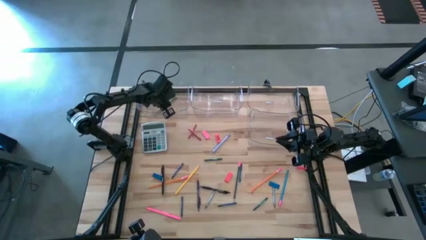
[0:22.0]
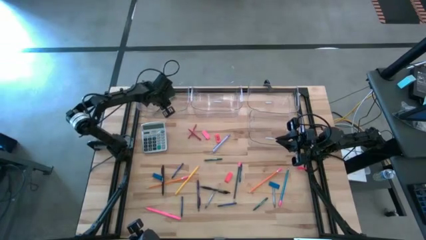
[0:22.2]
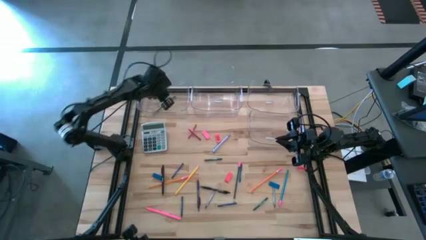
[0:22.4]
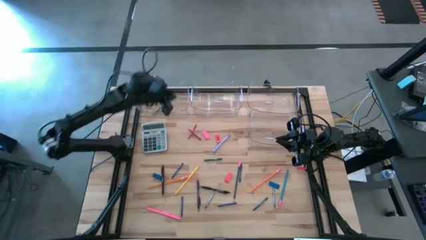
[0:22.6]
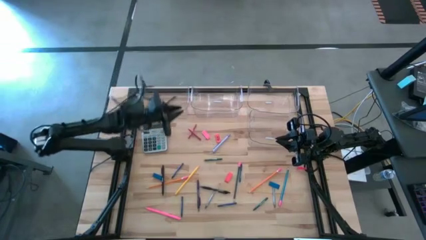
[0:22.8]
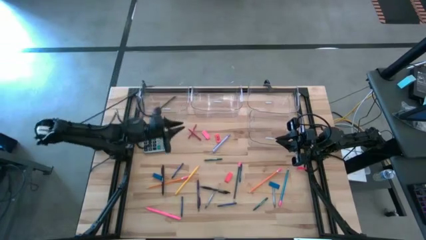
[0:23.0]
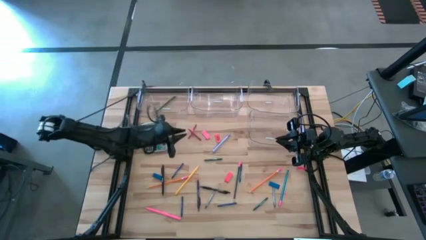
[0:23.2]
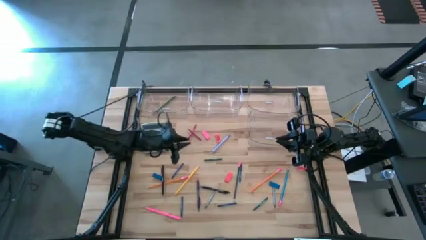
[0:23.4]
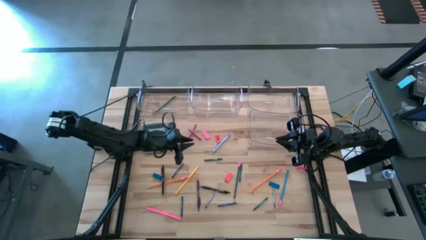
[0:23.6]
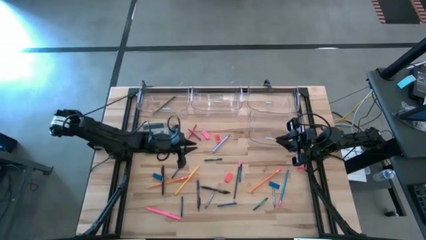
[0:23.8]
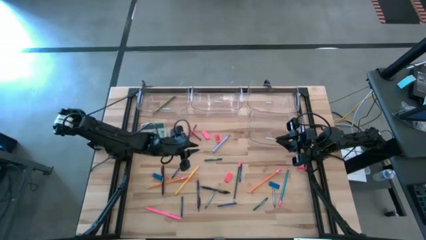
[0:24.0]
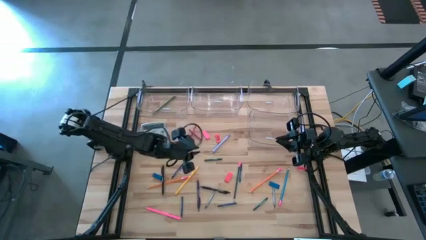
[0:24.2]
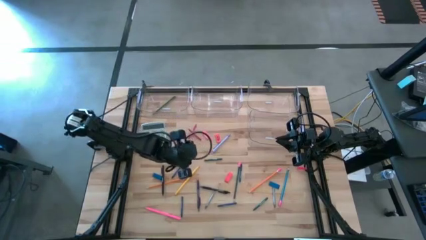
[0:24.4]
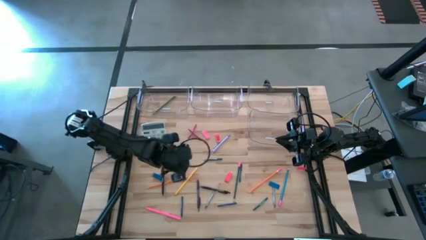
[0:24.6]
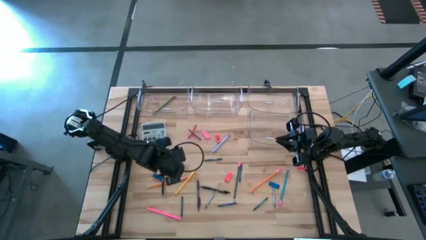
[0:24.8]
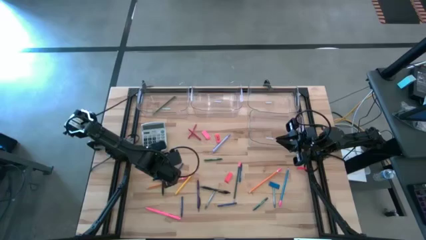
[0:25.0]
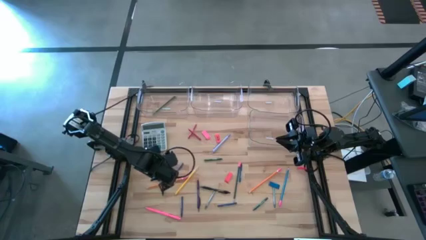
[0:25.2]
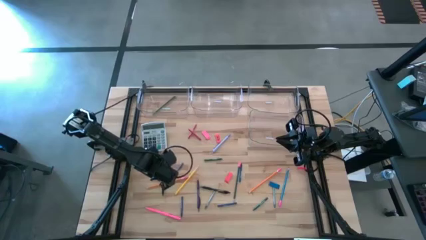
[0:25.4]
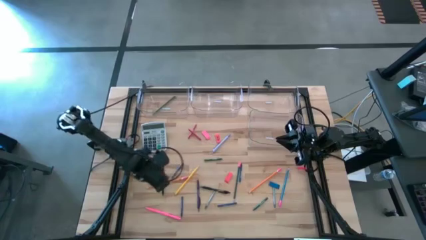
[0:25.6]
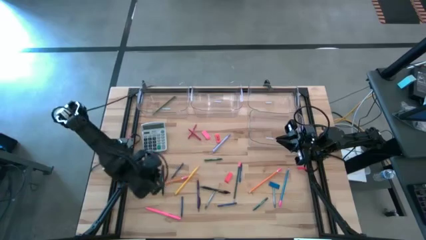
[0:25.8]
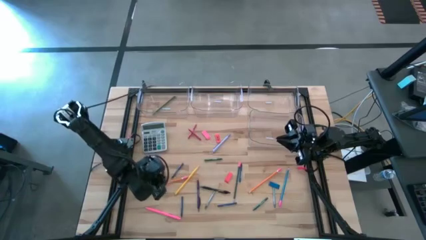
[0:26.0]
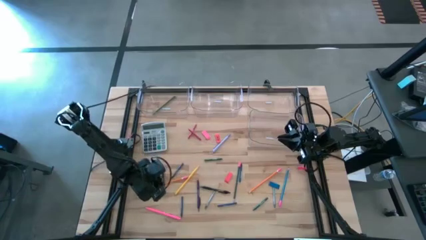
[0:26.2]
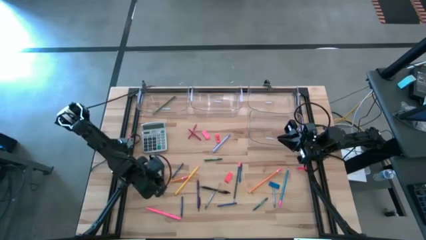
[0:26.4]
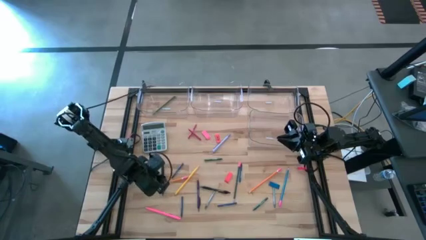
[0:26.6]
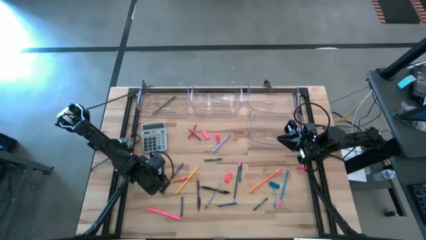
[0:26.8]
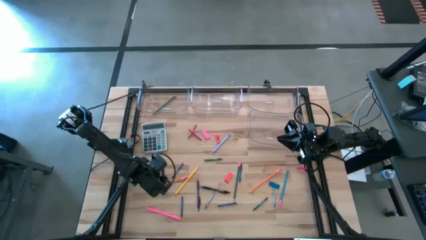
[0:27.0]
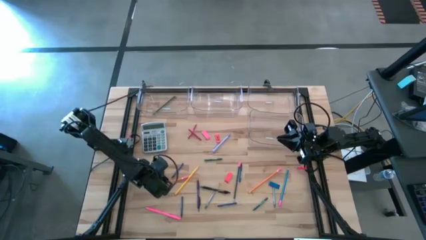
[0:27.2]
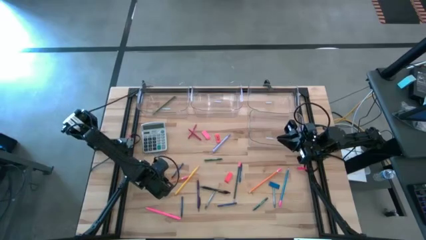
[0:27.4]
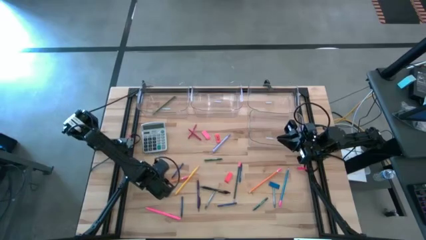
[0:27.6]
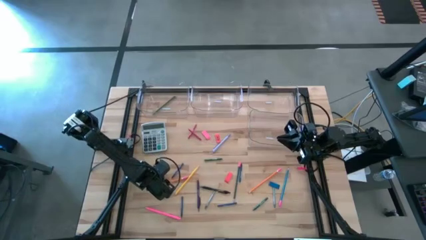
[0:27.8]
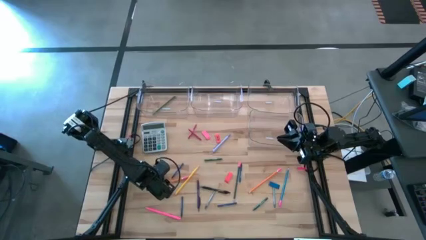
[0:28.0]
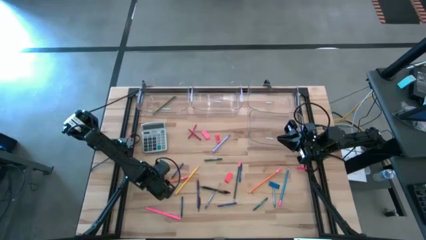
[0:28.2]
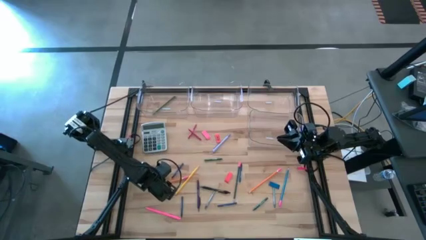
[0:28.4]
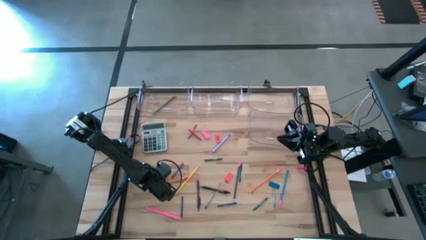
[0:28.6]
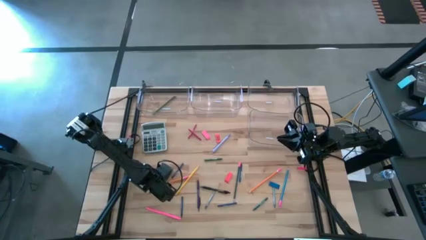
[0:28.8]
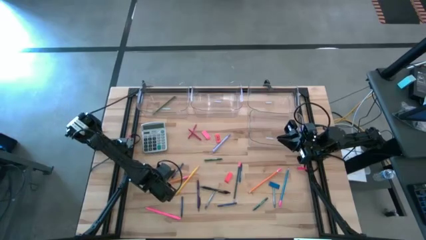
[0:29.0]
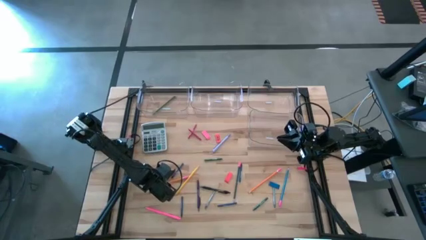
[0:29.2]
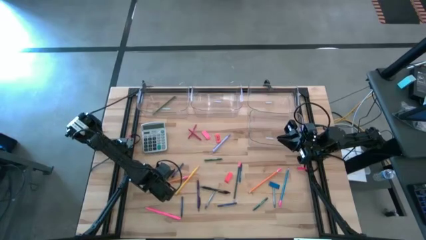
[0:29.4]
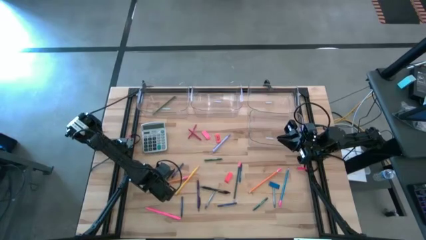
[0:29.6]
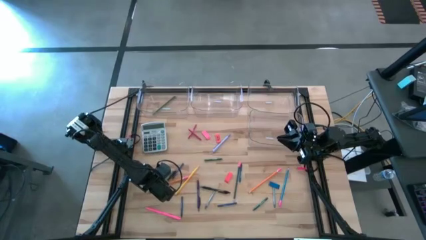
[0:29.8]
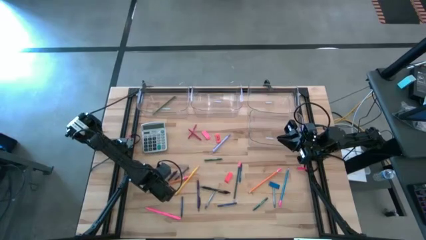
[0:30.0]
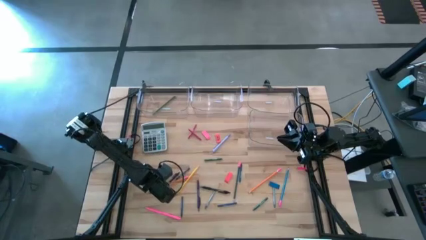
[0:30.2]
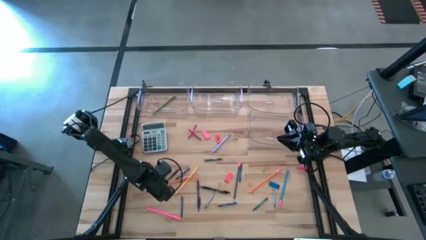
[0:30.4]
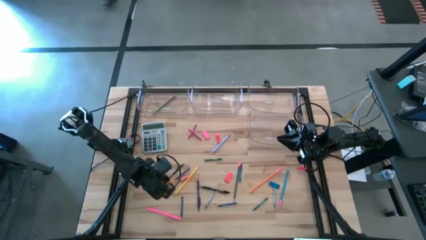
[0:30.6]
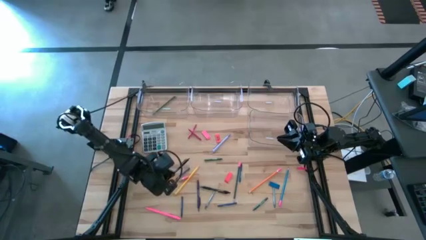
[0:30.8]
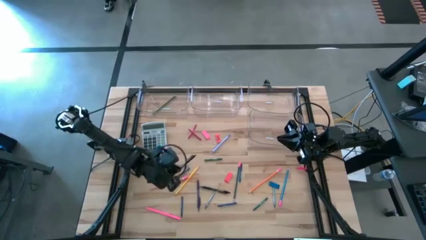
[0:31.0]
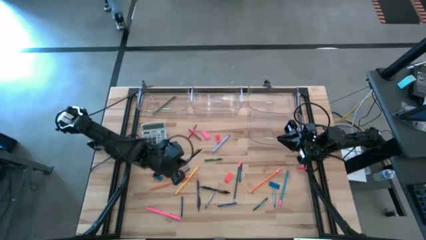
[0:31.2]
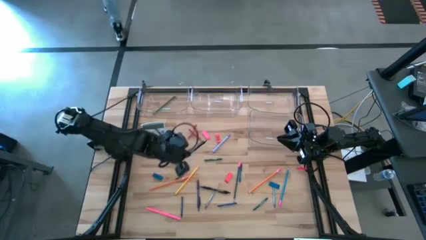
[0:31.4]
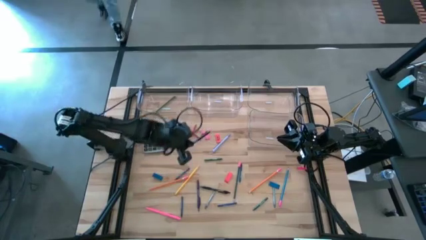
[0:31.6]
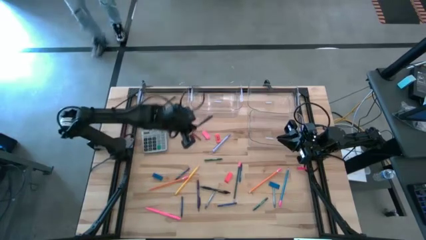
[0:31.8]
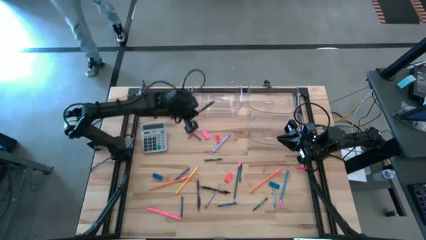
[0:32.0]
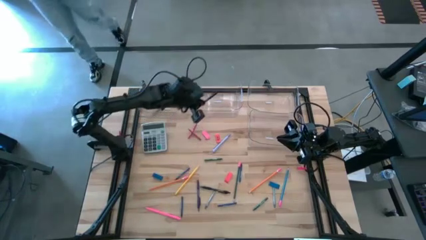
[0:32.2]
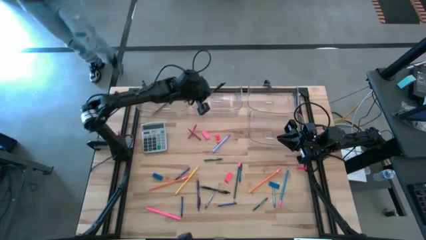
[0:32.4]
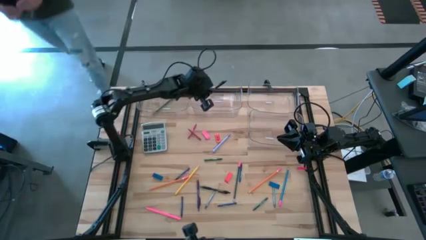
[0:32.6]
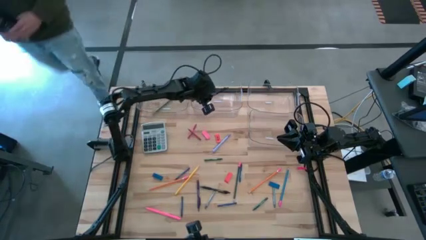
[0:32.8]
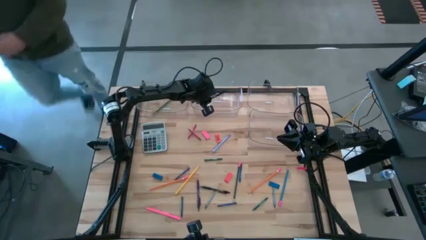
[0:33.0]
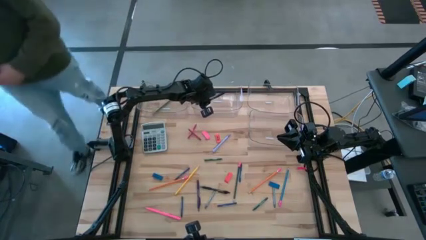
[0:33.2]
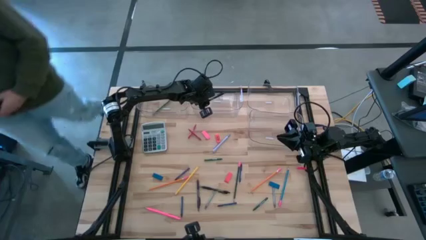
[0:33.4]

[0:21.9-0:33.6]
Task: Sort crayons/erasers/pens/pencils in bins
Put the black pen into the top middle transparent bin

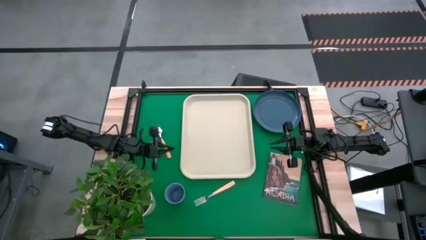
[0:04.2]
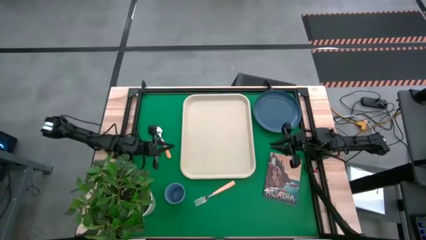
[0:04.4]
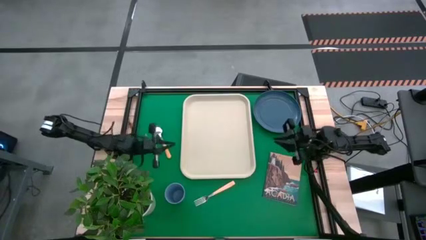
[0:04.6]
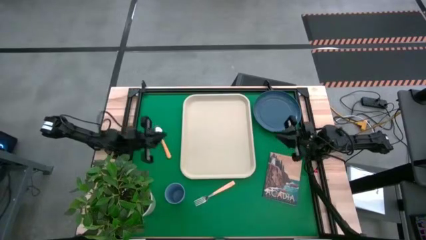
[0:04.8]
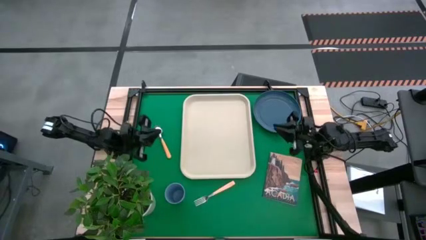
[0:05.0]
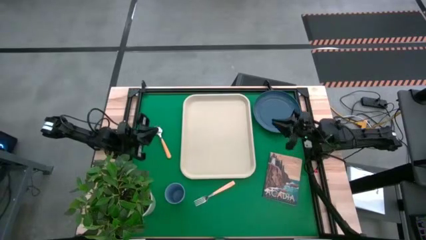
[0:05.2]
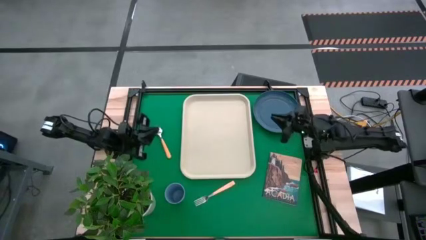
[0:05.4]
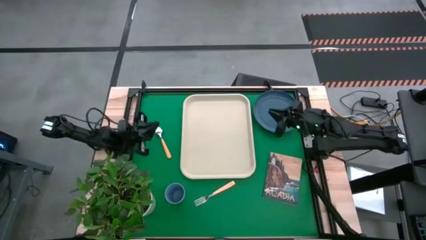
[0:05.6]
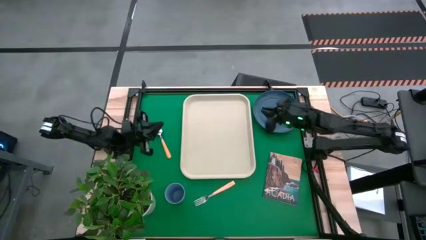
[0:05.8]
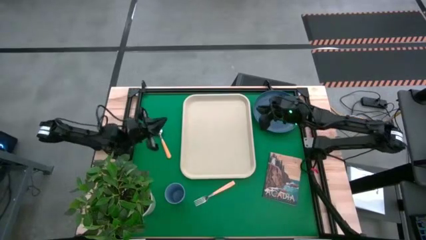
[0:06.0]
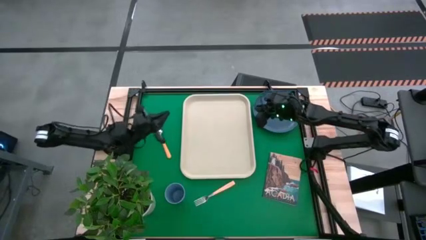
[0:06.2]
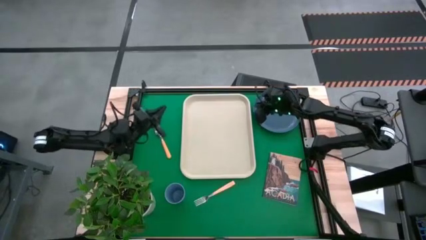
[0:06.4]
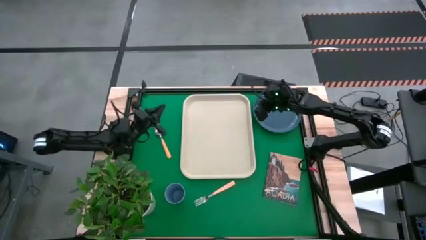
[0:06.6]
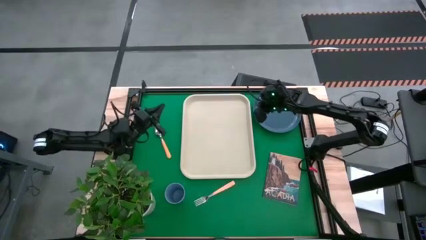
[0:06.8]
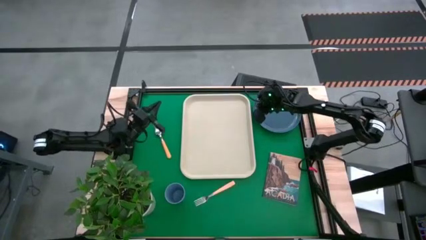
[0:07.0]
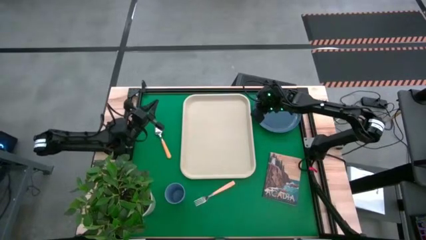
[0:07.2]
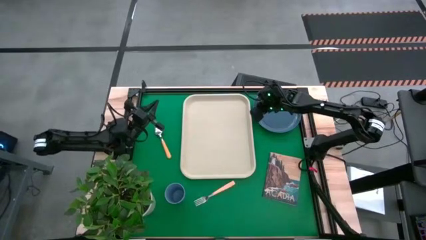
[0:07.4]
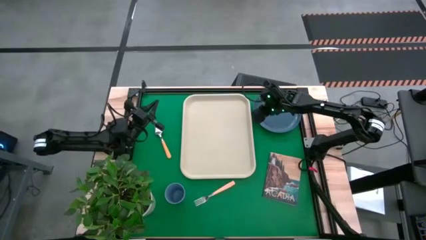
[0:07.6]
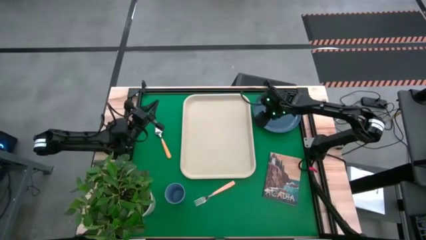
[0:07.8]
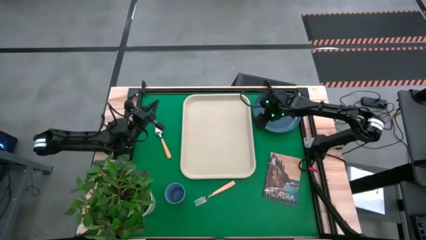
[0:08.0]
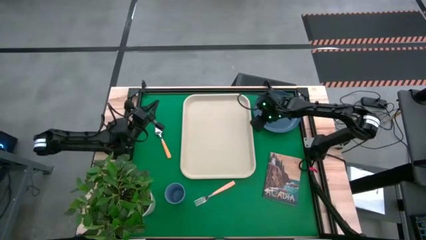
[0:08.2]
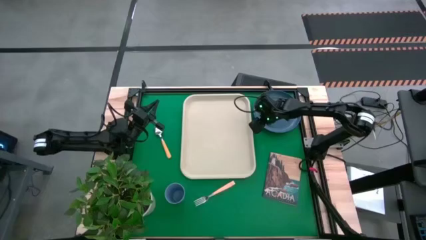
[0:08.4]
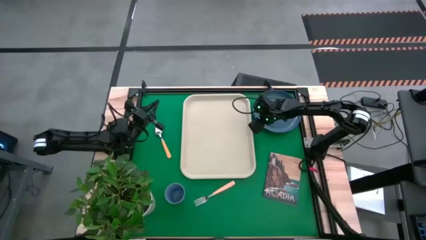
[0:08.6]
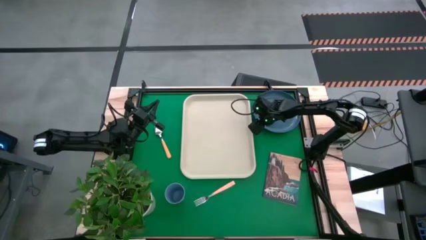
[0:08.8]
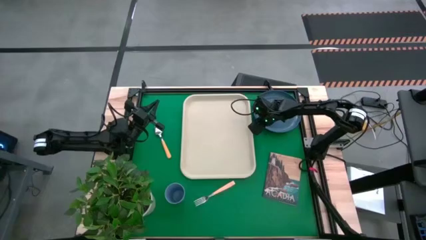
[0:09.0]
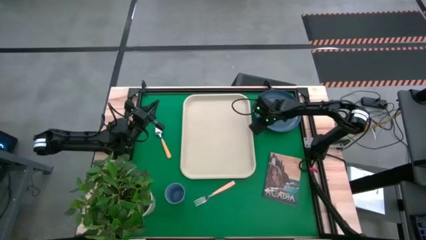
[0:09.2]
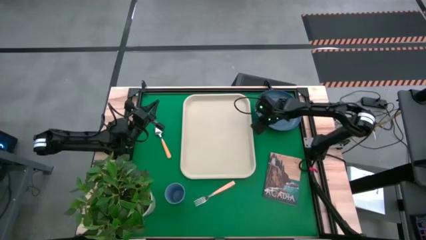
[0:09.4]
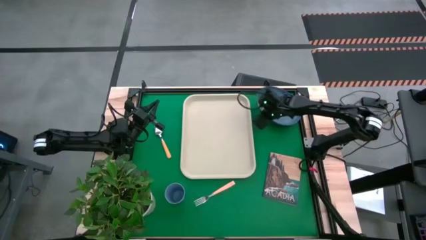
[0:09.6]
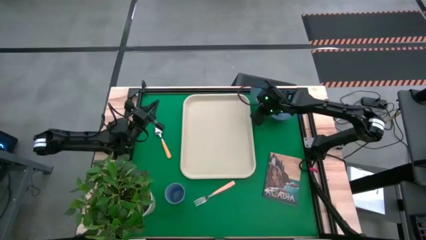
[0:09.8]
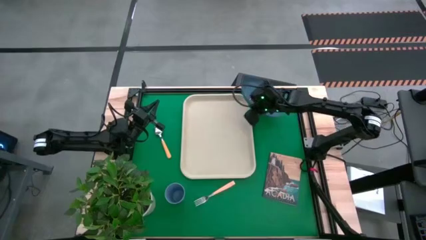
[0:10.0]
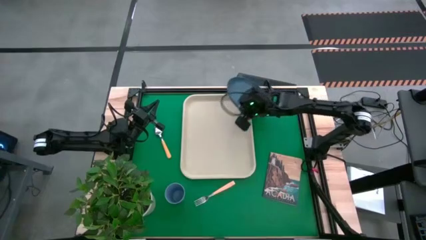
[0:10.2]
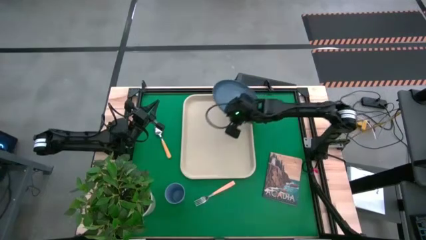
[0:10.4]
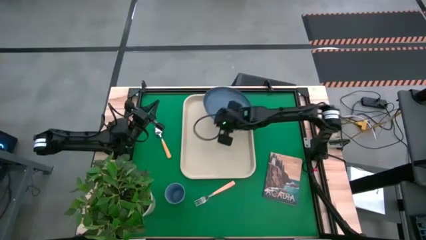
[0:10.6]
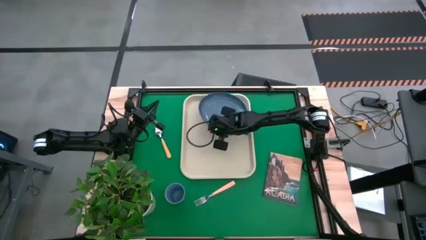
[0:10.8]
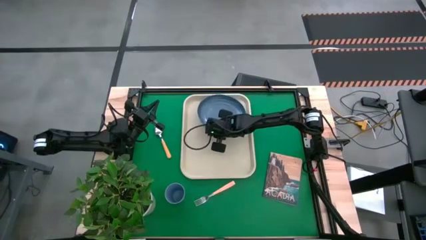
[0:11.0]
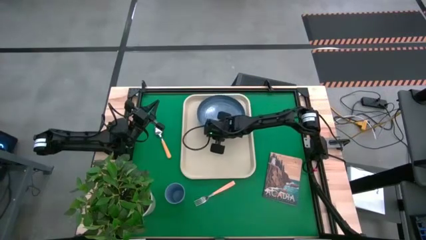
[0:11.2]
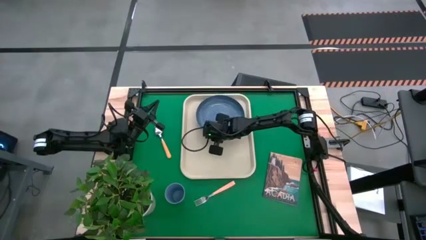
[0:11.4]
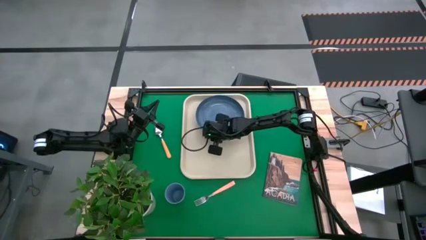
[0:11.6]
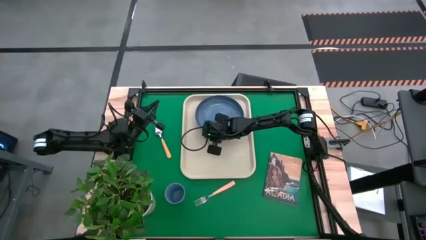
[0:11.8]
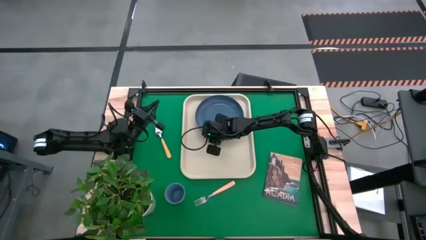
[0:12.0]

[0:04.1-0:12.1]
Task: Pick and place plate/cup/fork/spoon on tray
Put the blue plate on the white tray
